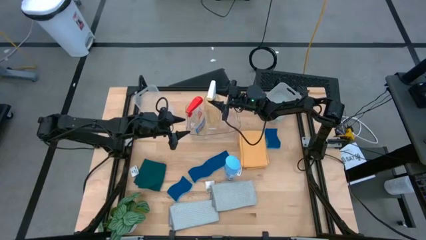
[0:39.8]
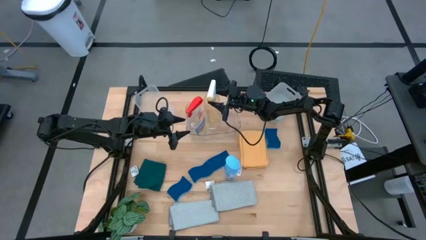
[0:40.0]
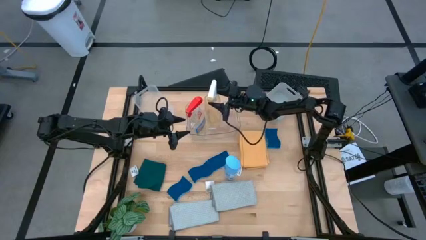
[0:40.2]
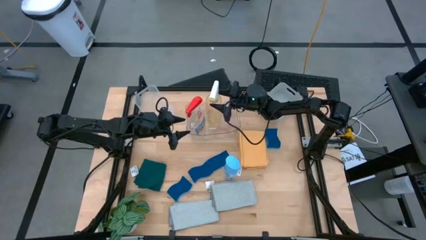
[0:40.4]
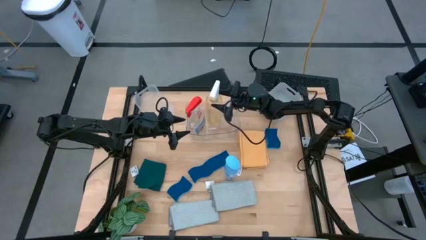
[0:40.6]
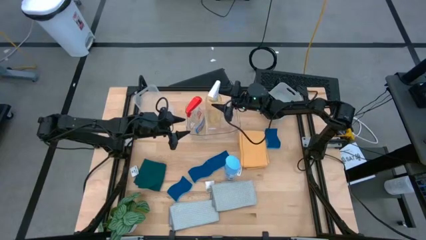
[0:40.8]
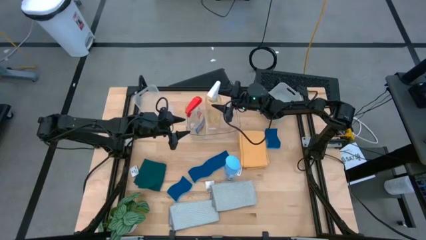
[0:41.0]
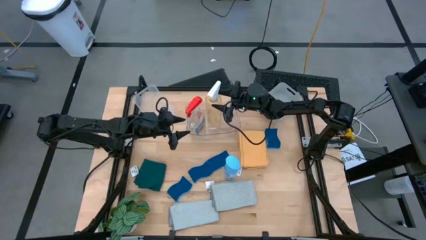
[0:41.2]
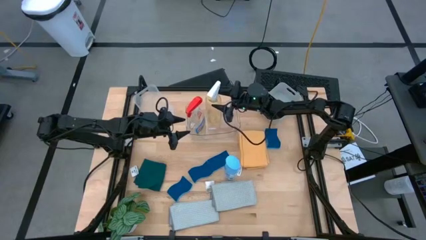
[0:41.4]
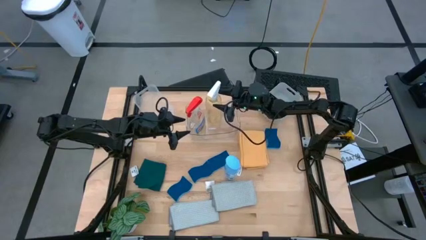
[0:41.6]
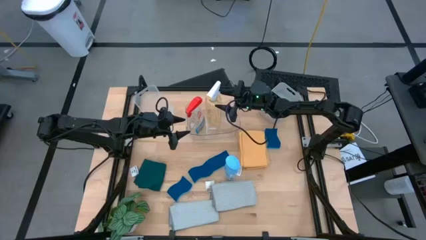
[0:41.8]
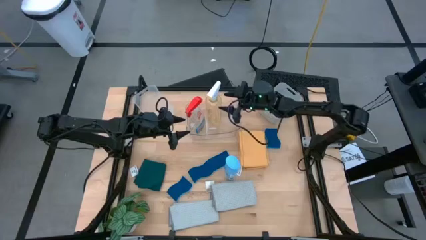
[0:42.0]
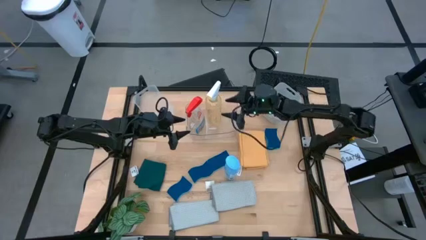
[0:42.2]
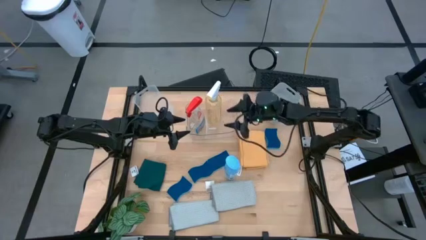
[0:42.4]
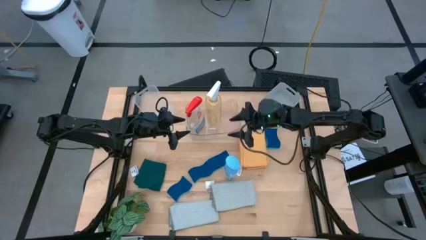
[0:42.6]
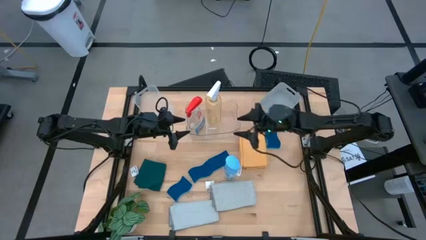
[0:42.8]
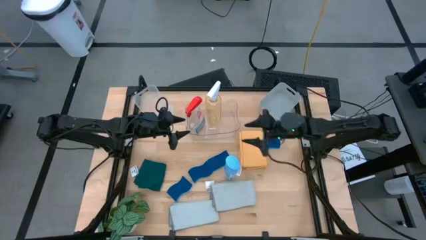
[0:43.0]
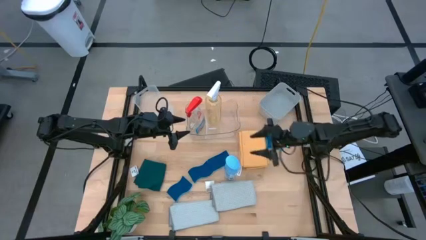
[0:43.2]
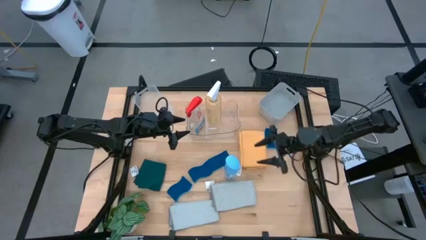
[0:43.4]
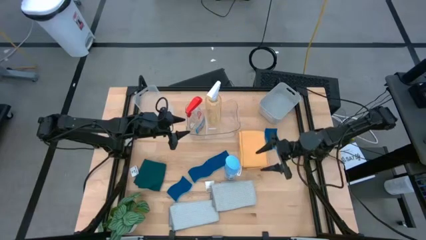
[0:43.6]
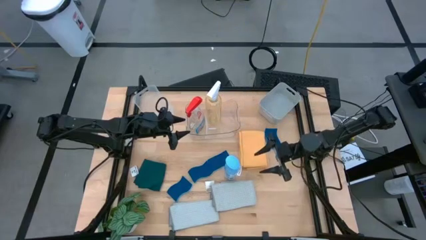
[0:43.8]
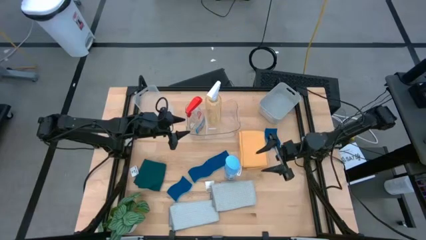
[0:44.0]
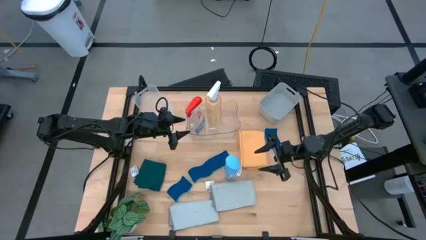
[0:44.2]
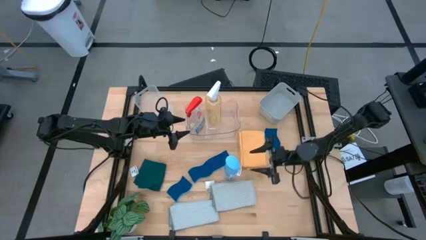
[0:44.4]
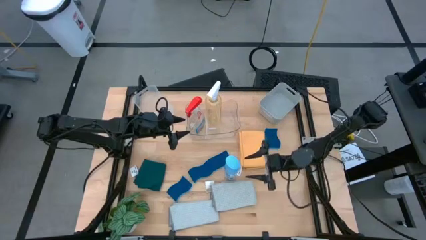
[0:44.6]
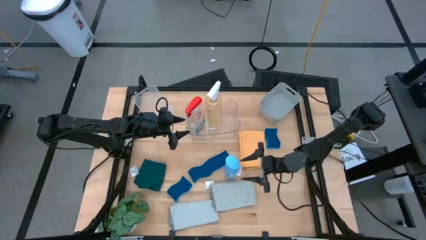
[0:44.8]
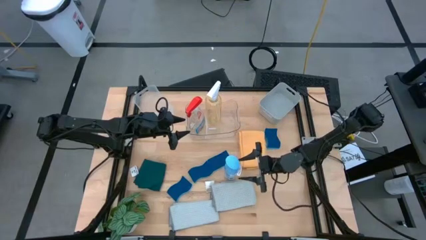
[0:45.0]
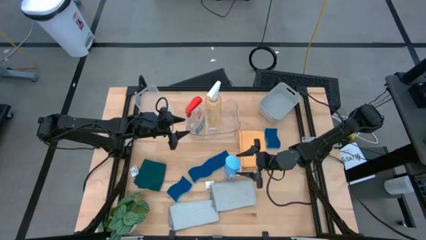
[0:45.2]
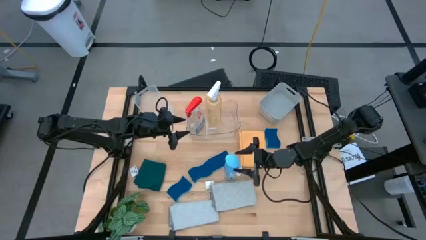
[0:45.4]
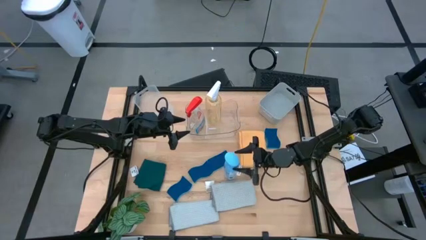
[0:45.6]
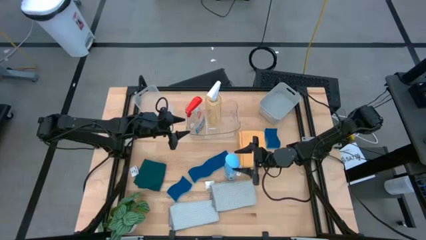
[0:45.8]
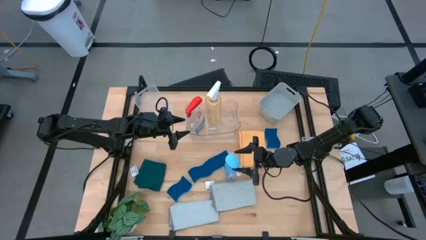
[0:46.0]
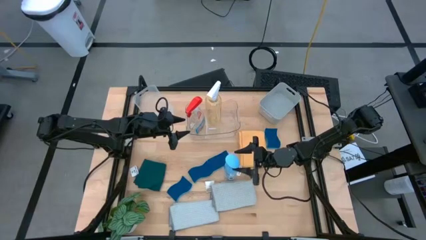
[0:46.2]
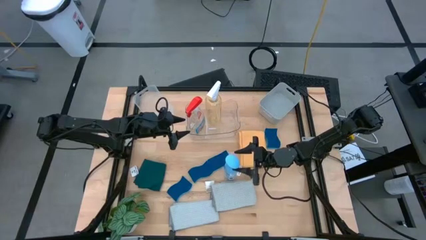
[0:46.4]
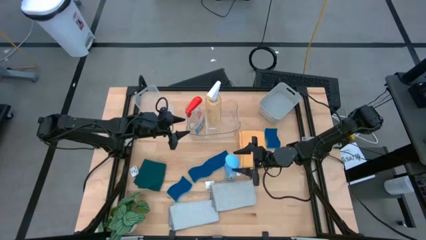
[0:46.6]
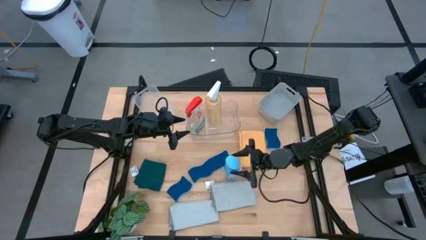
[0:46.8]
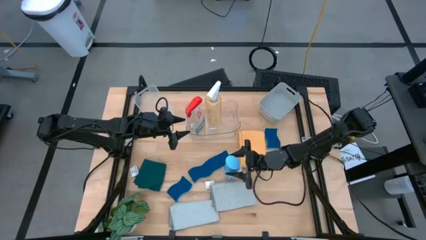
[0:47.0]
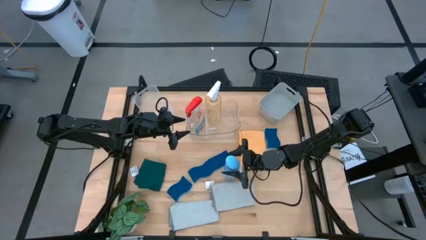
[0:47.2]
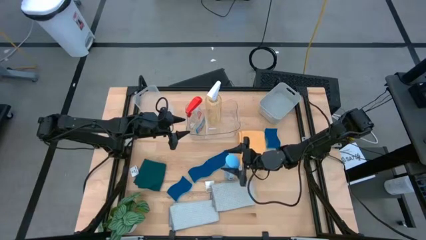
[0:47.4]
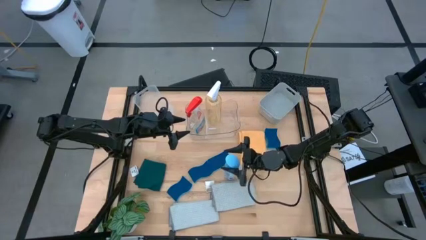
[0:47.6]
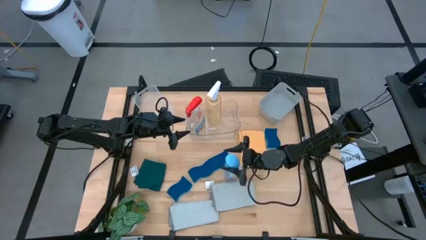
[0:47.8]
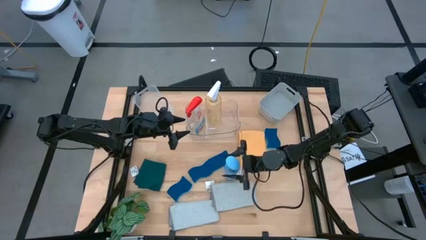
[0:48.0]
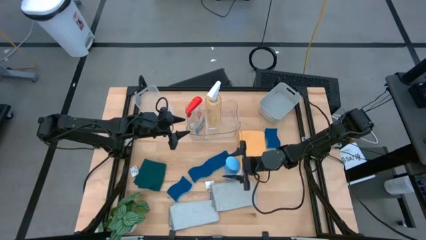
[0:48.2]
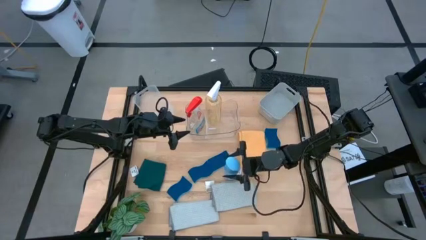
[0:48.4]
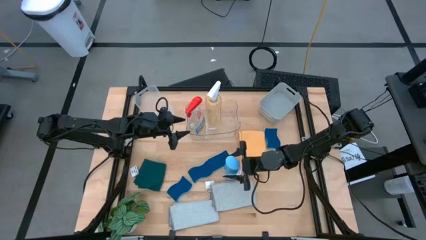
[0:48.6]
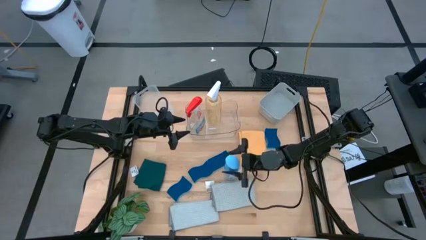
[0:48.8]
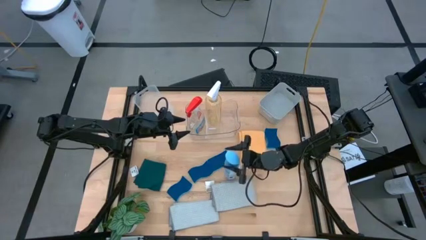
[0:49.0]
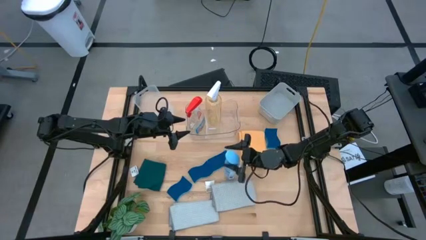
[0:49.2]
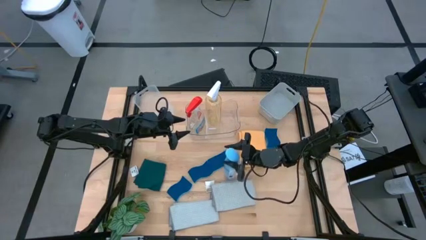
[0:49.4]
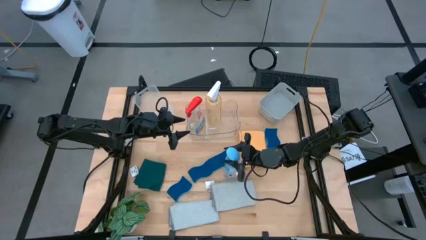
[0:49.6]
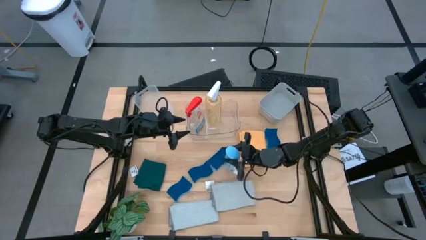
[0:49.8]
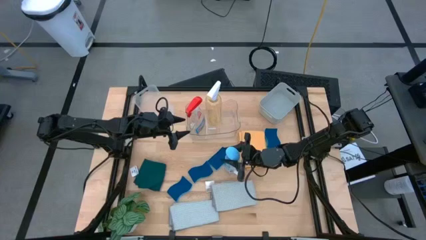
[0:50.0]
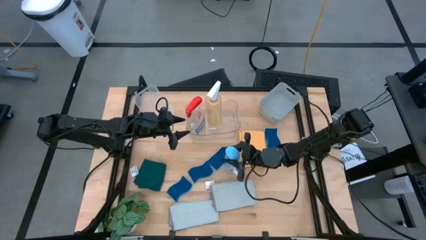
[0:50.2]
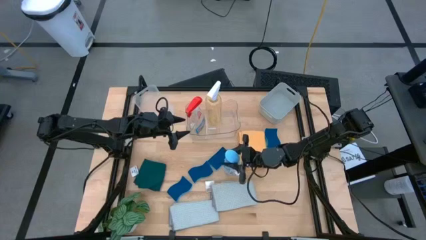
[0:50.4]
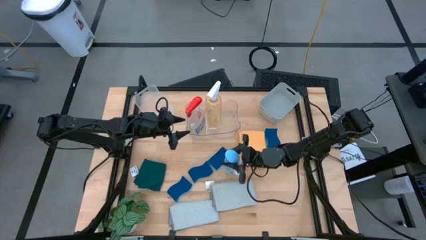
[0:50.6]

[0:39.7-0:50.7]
Task: Pick & Place Kitchen Items
Put the blue air freshener spray into the transparent bin
